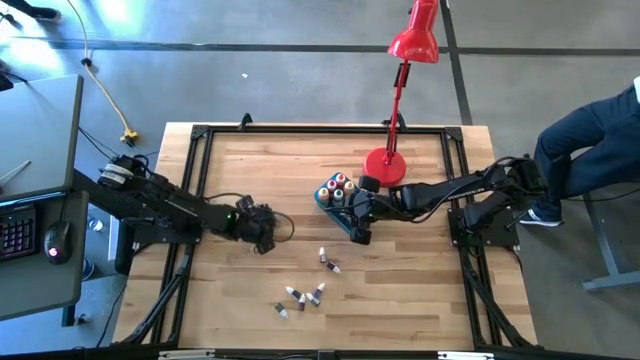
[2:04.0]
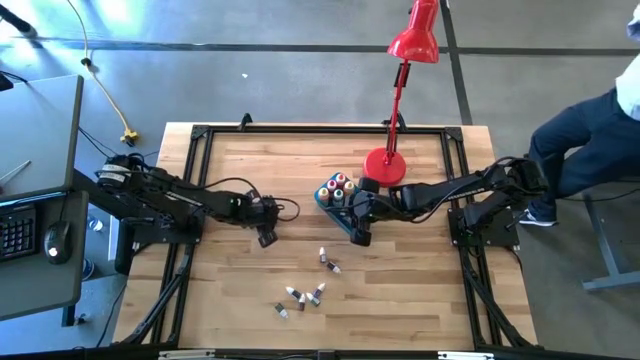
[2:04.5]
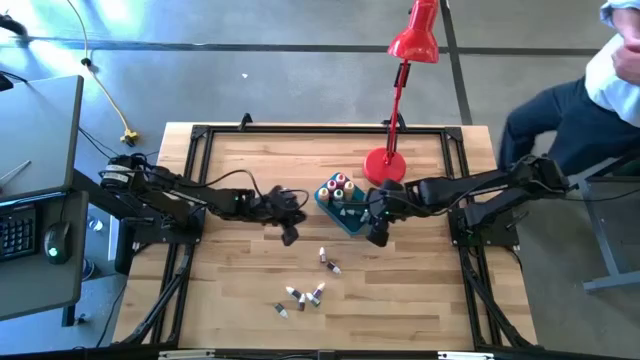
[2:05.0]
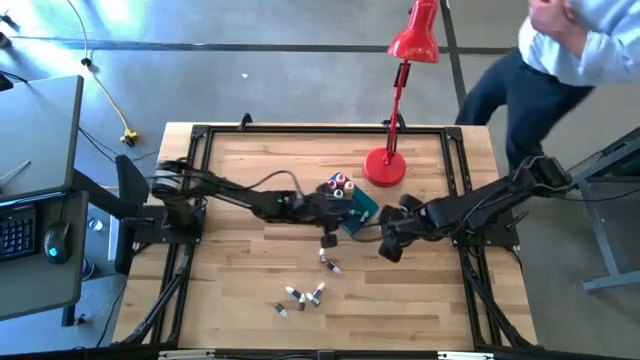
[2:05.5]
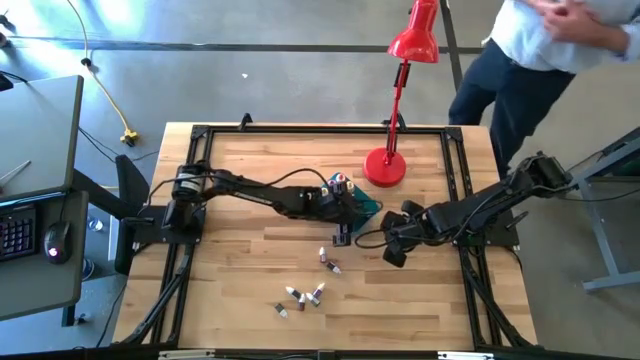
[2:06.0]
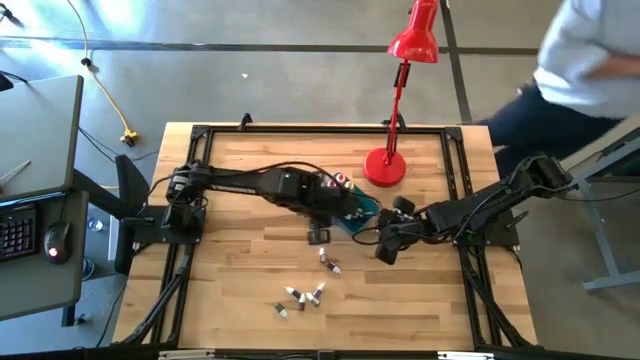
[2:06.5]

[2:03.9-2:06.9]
Task: Pick & Place food coloring
Put the small food coloring bottle into the blue container

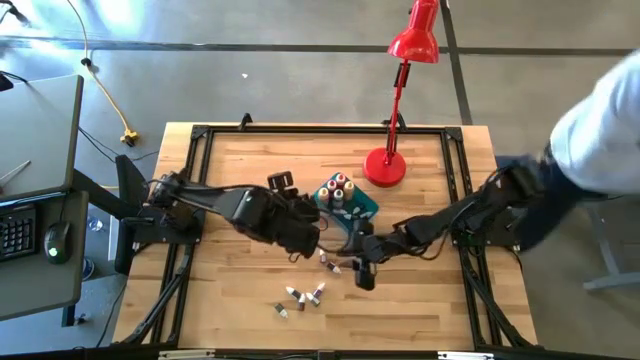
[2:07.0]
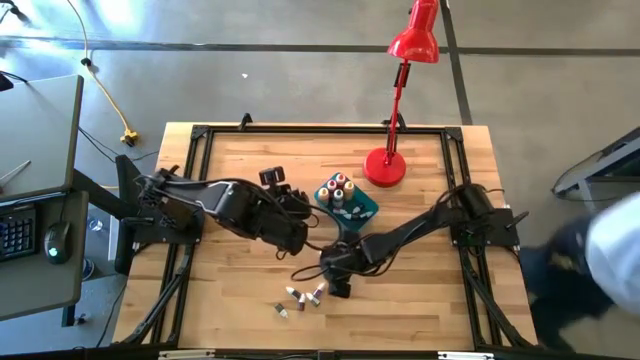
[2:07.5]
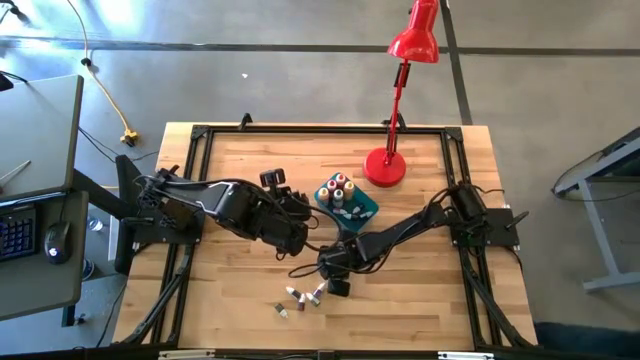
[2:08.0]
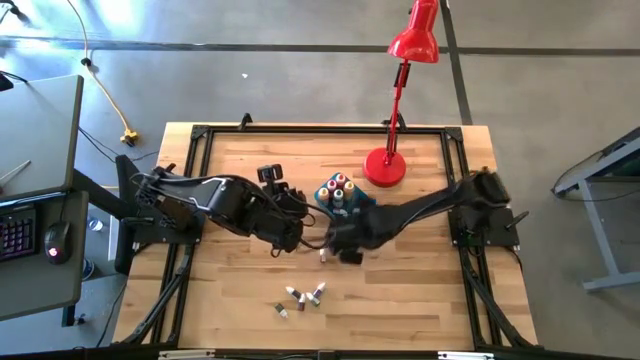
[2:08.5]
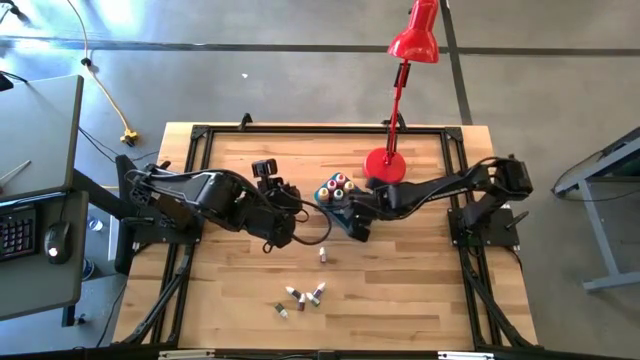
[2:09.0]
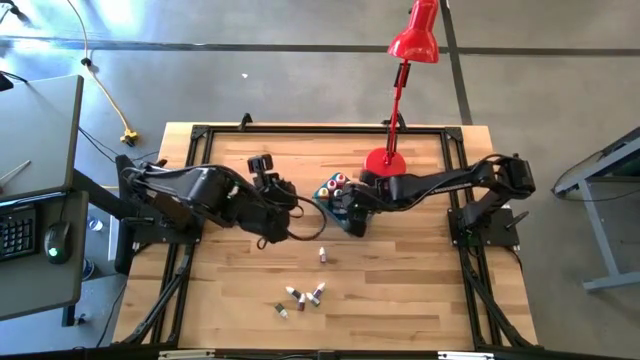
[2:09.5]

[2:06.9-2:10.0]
Put the small food coloring bottle into the blue container

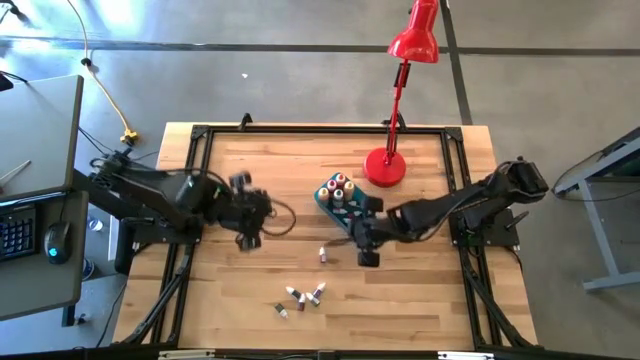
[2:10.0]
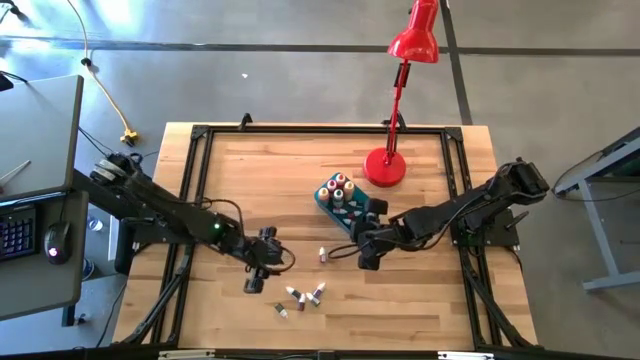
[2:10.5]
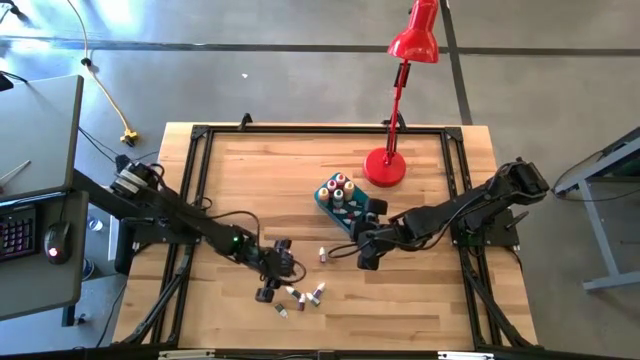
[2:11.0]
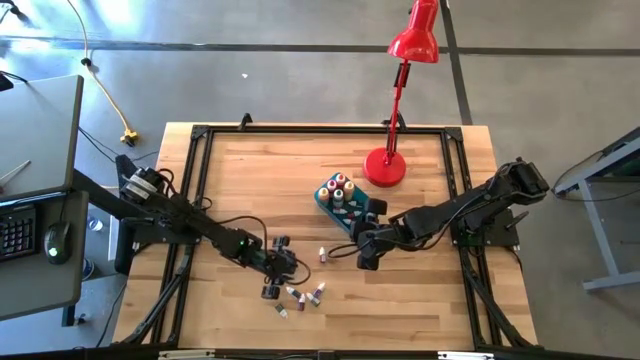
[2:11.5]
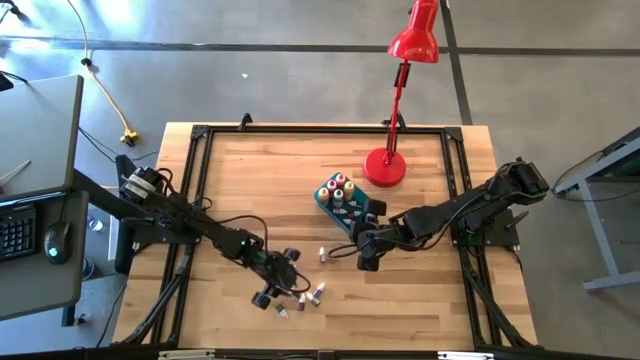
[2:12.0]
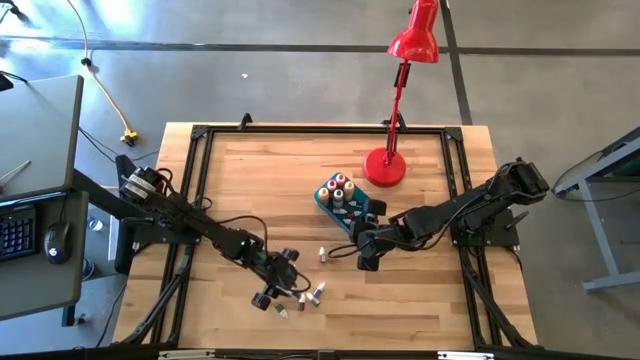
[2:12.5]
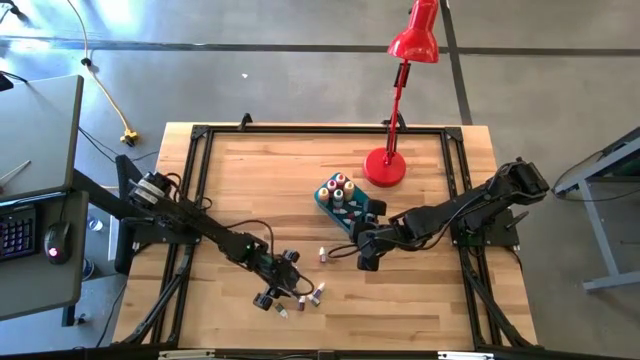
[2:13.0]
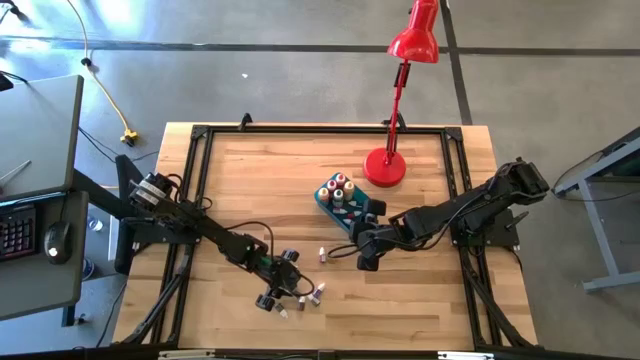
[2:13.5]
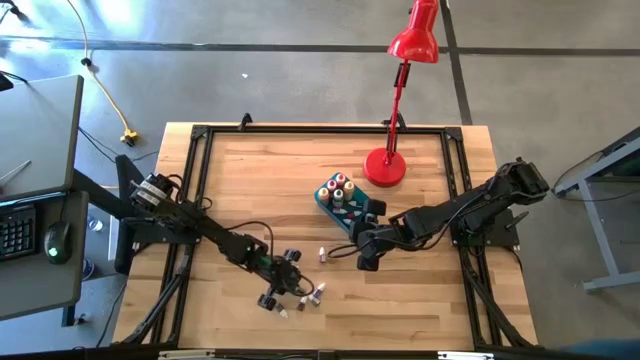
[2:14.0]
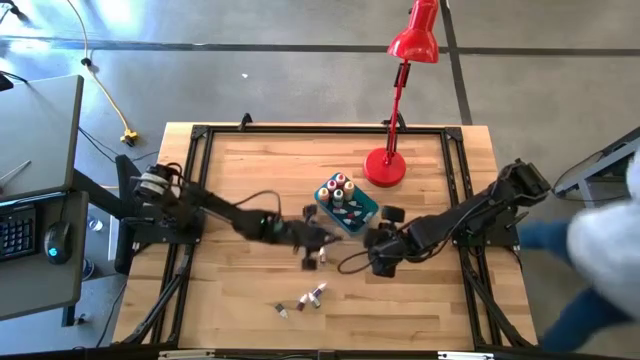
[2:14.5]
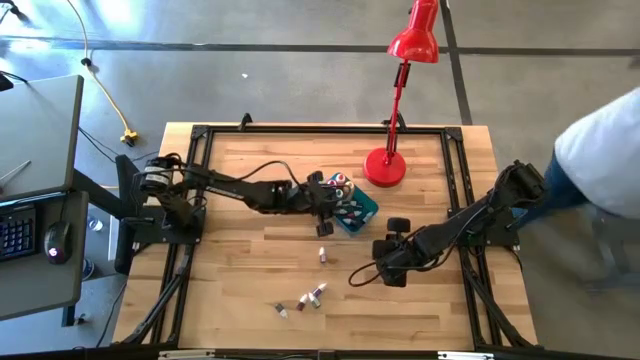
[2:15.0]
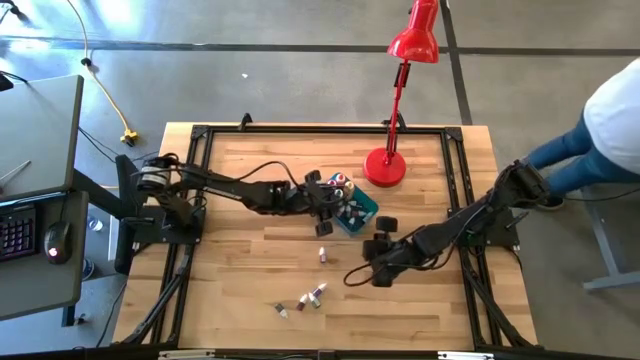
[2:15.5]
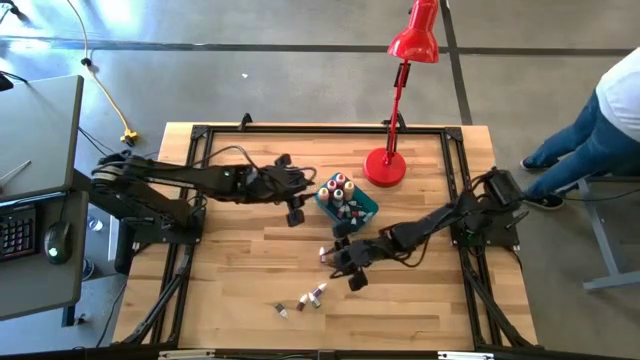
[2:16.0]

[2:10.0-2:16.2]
Put the small food coloring bottle into the blue container

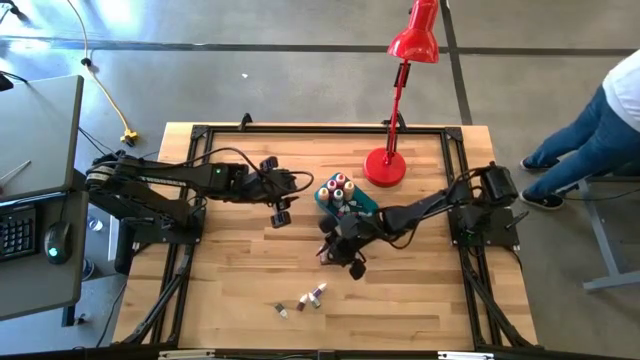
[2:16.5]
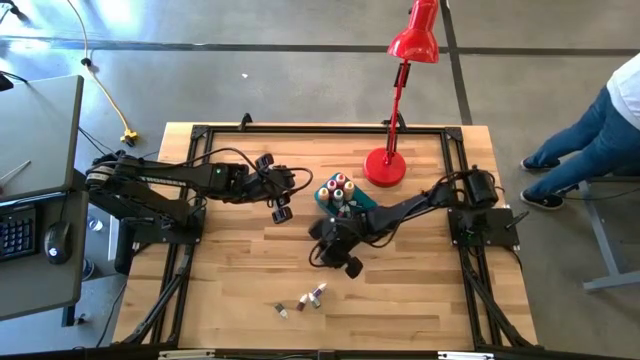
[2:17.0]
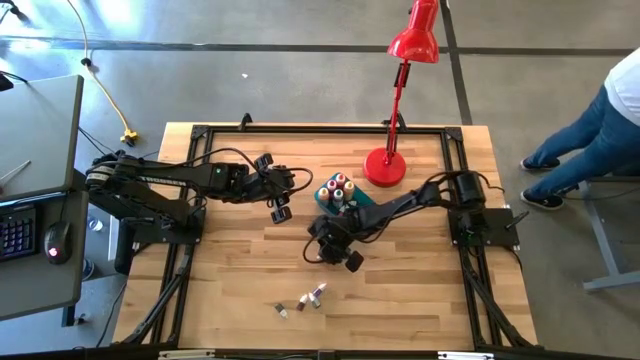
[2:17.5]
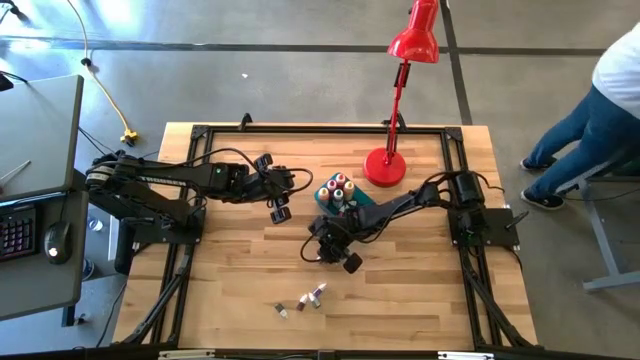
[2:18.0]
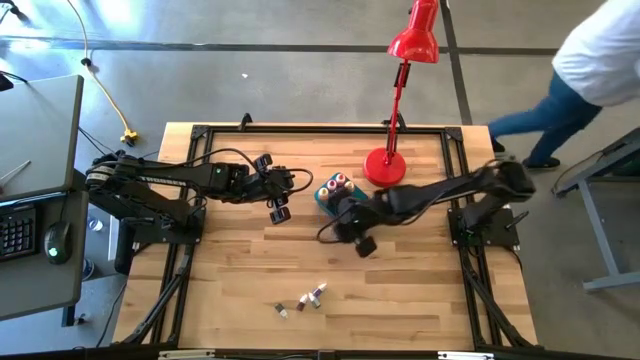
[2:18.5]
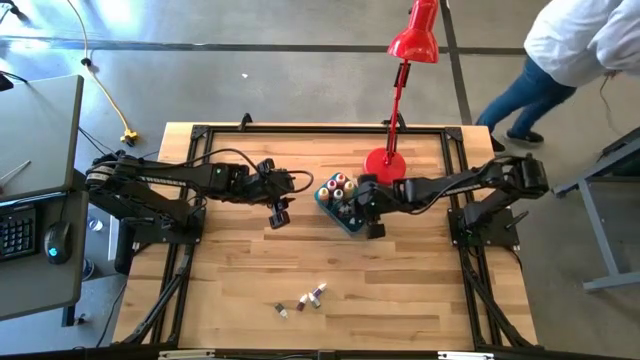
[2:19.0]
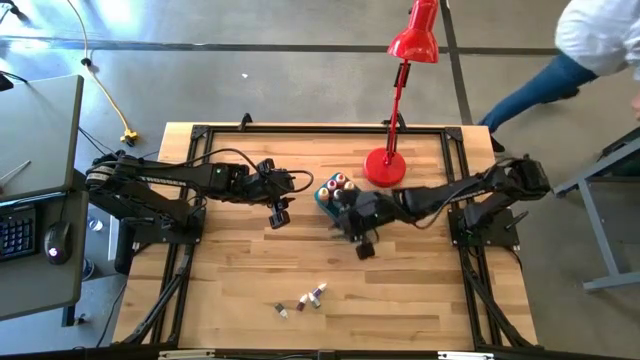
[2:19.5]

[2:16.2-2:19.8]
Put the small food coloring bottle into the blue container

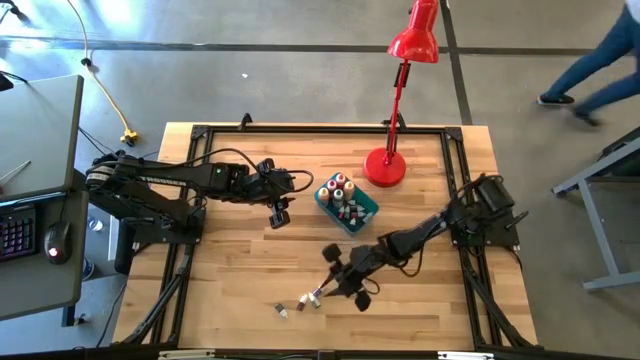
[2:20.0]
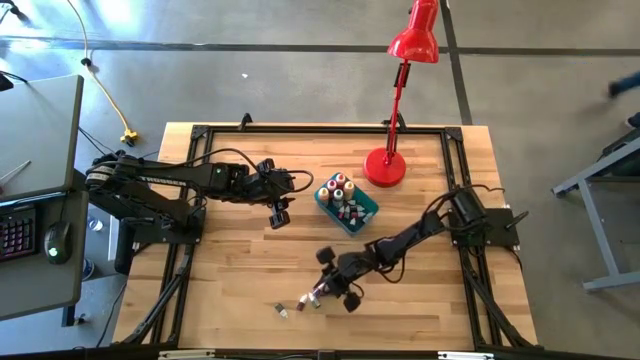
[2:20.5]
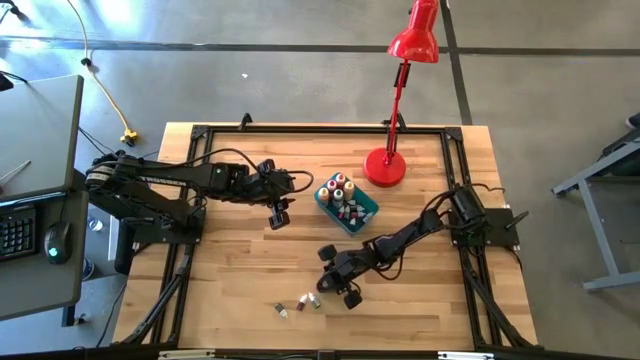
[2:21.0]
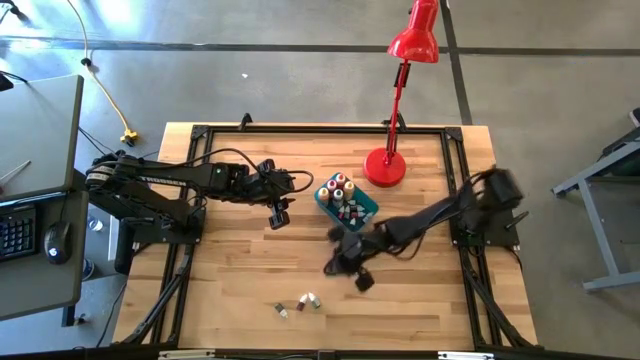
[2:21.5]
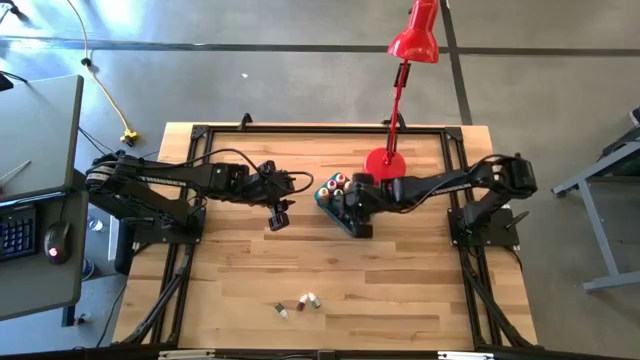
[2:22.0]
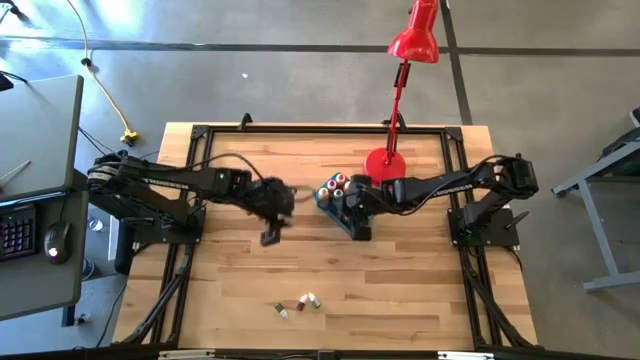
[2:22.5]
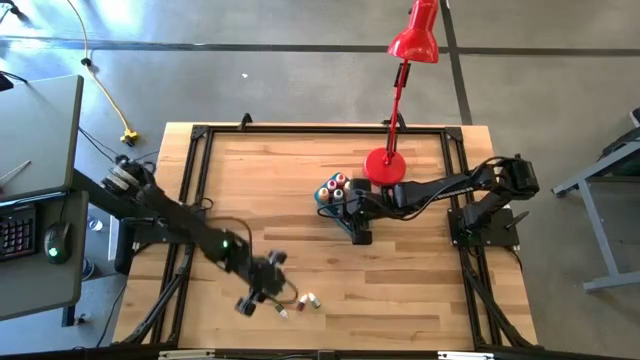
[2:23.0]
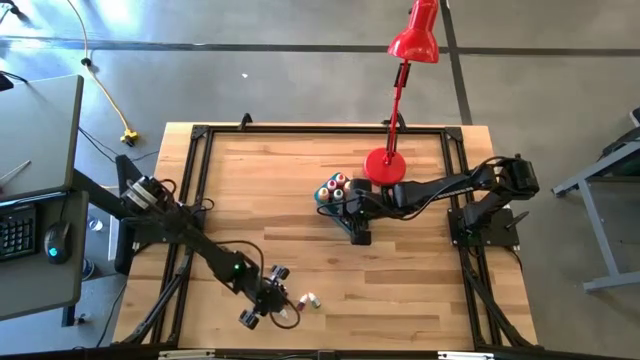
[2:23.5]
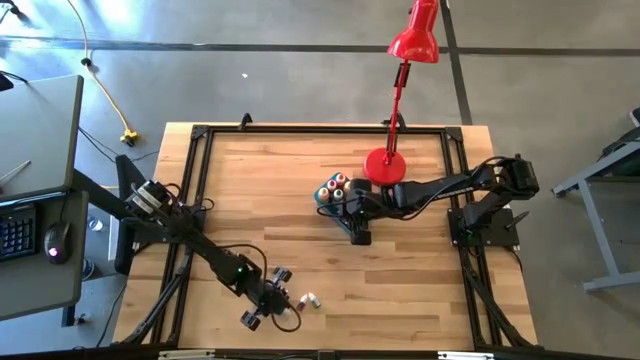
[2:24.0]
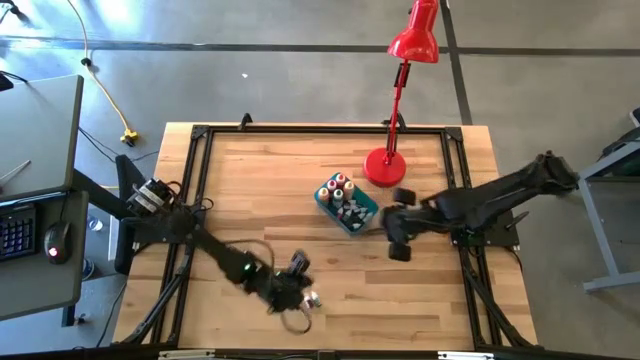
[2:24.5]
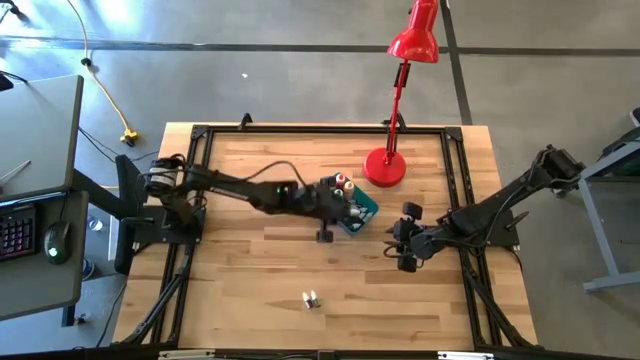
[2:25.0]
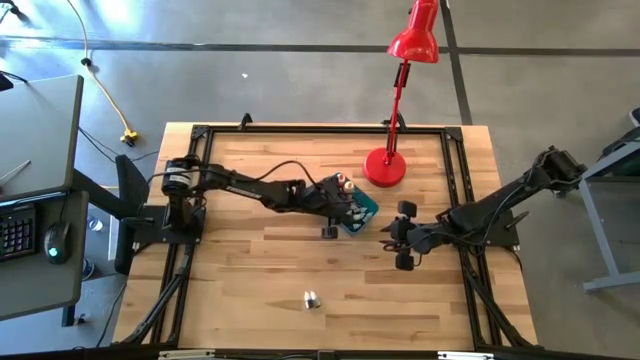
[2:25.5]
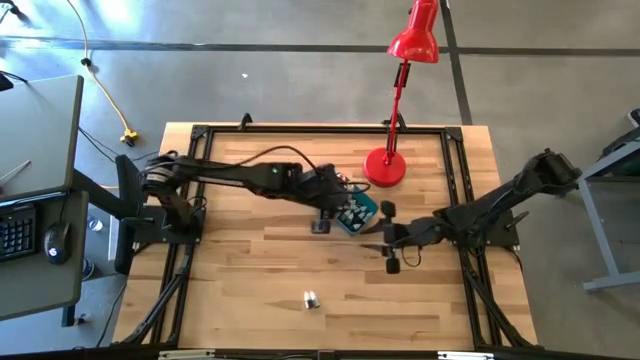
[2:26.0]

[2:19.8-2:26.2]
Put the small food coloring bottle into the blue container
